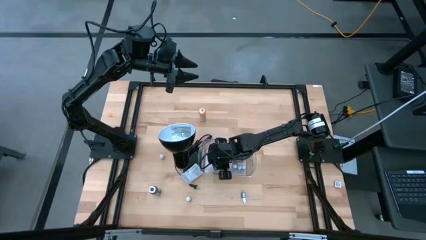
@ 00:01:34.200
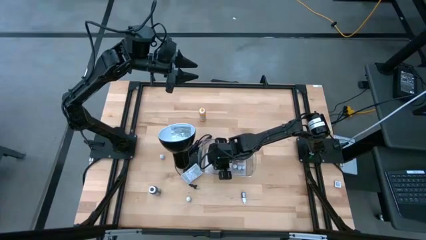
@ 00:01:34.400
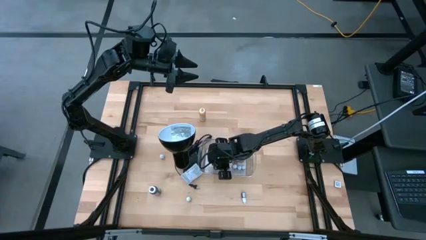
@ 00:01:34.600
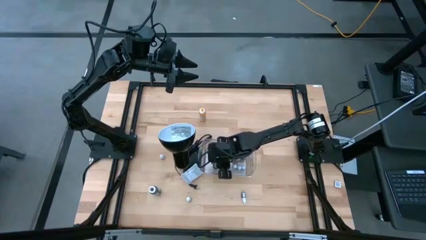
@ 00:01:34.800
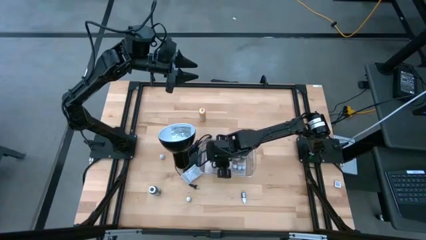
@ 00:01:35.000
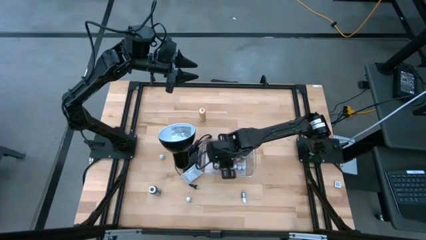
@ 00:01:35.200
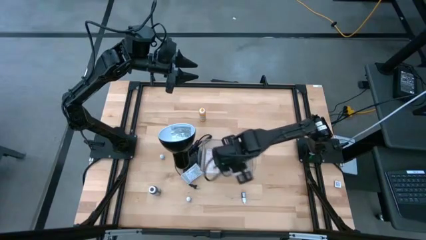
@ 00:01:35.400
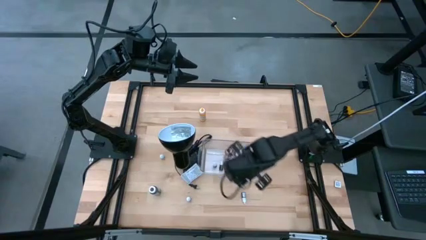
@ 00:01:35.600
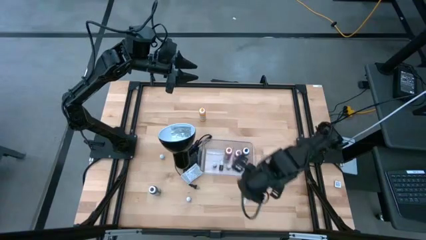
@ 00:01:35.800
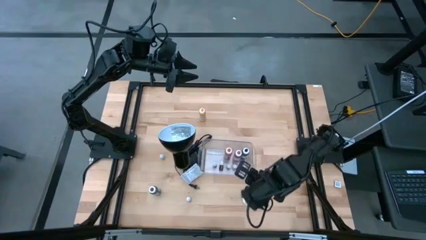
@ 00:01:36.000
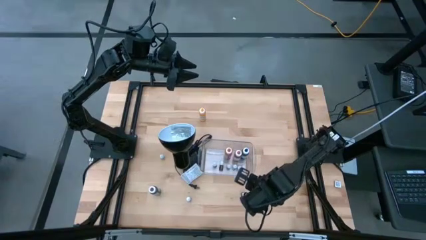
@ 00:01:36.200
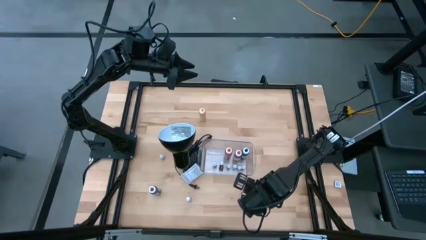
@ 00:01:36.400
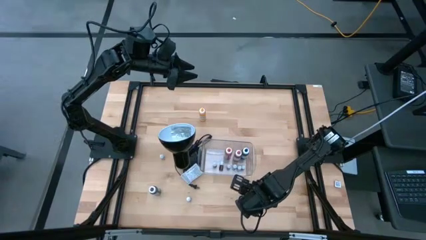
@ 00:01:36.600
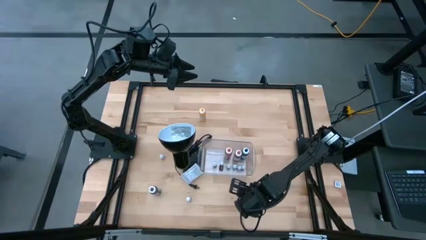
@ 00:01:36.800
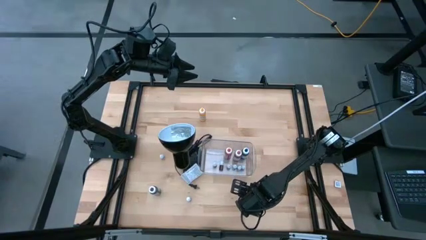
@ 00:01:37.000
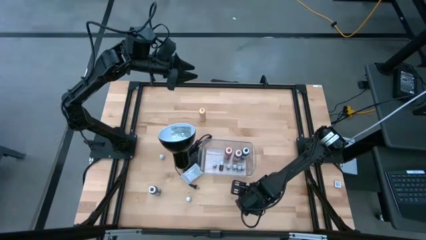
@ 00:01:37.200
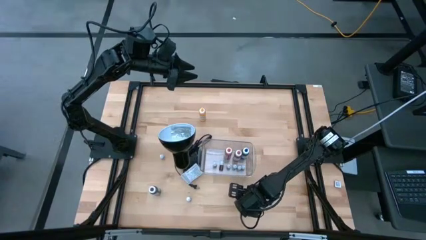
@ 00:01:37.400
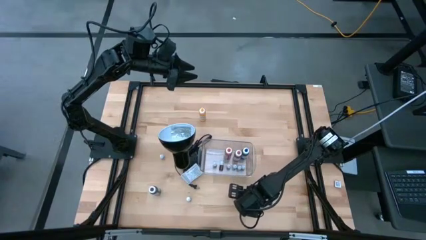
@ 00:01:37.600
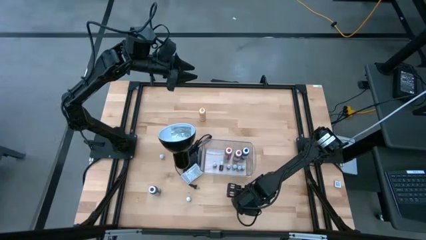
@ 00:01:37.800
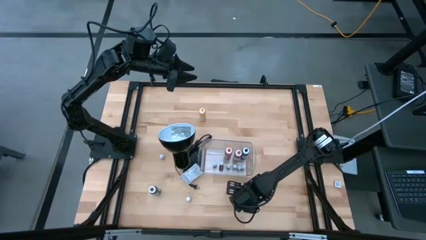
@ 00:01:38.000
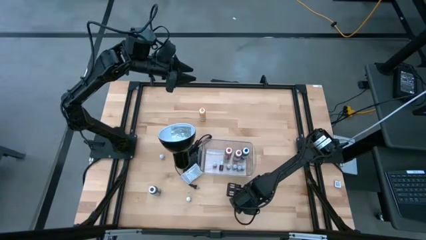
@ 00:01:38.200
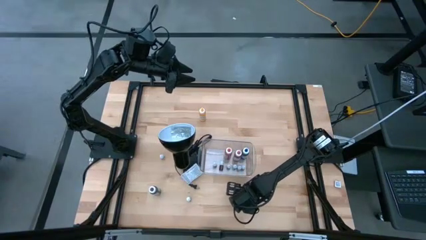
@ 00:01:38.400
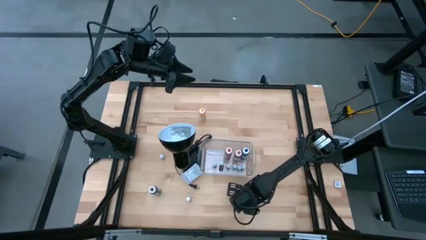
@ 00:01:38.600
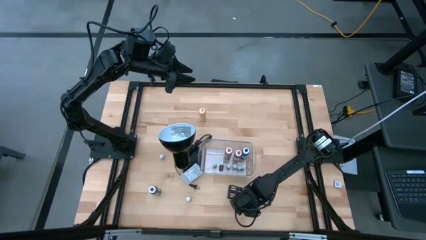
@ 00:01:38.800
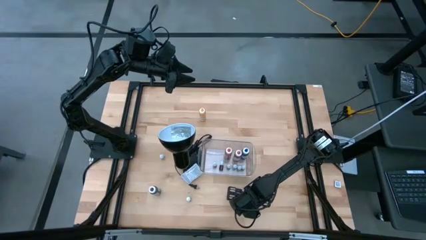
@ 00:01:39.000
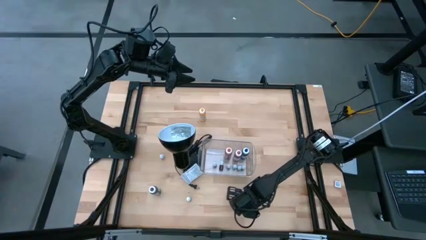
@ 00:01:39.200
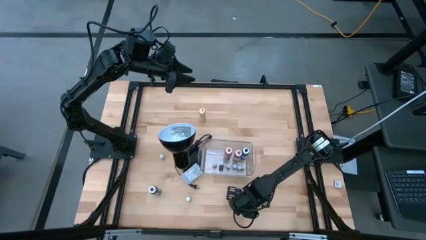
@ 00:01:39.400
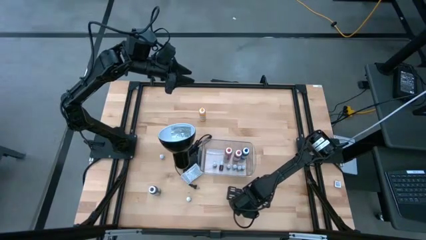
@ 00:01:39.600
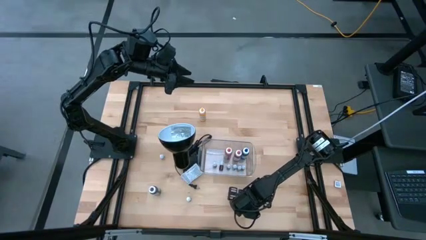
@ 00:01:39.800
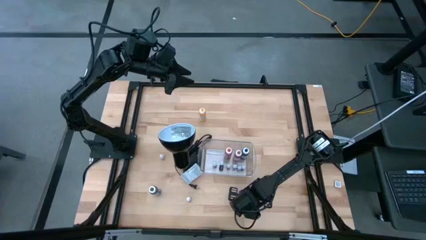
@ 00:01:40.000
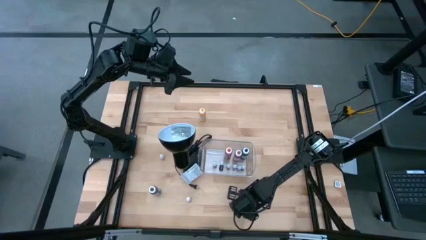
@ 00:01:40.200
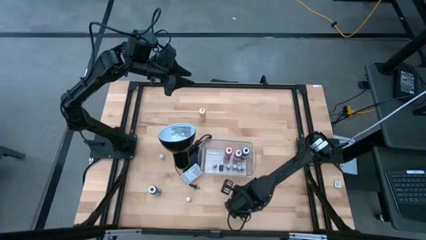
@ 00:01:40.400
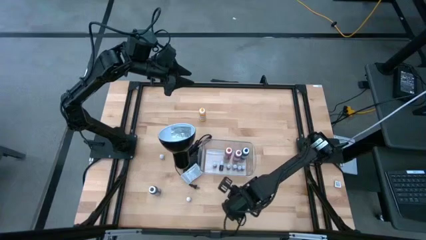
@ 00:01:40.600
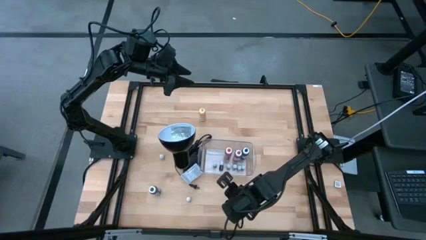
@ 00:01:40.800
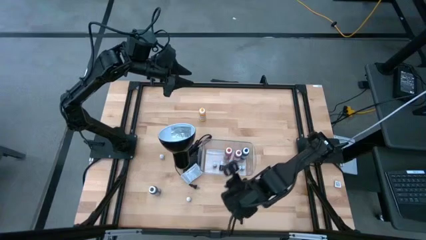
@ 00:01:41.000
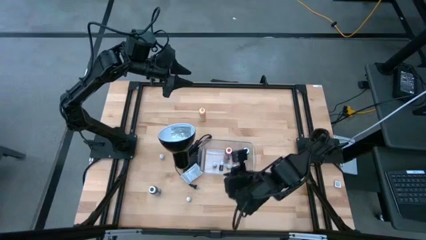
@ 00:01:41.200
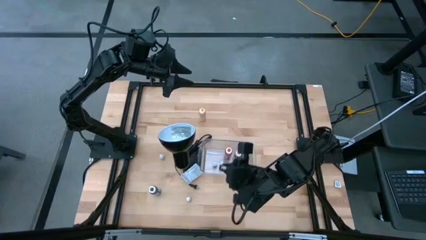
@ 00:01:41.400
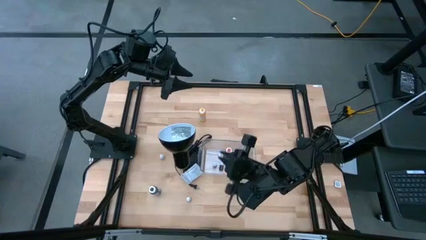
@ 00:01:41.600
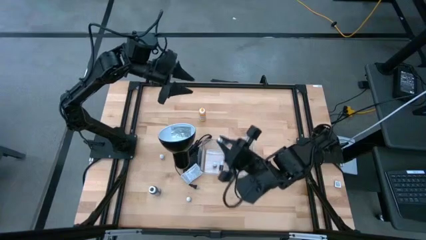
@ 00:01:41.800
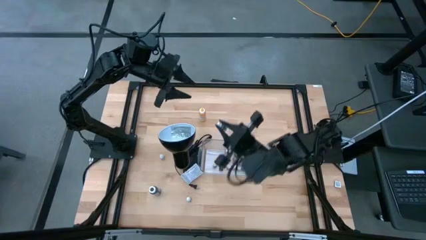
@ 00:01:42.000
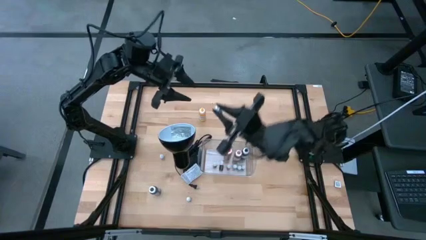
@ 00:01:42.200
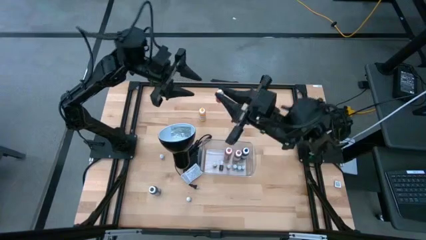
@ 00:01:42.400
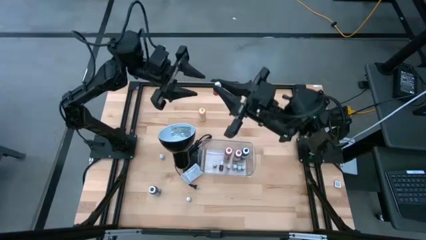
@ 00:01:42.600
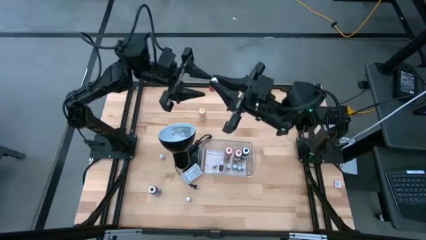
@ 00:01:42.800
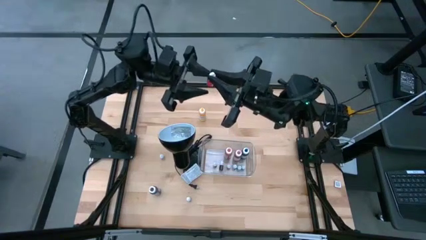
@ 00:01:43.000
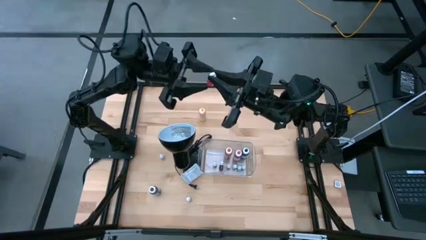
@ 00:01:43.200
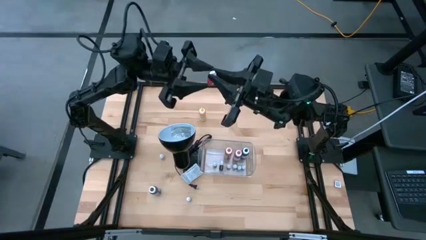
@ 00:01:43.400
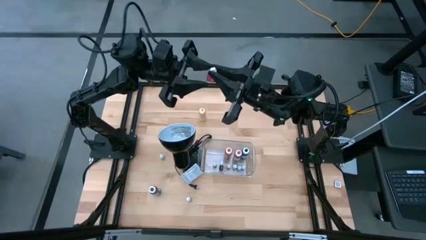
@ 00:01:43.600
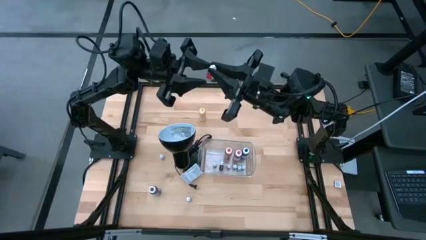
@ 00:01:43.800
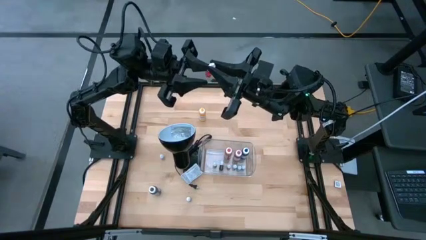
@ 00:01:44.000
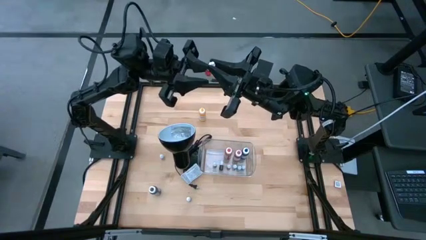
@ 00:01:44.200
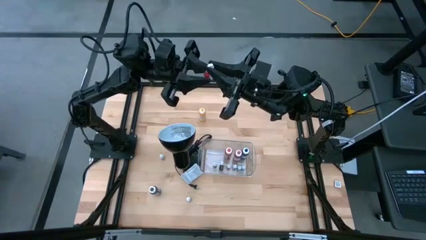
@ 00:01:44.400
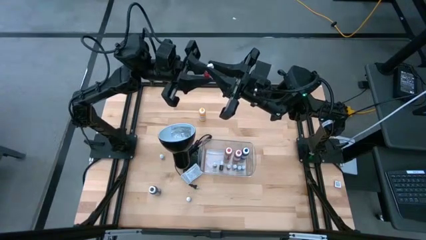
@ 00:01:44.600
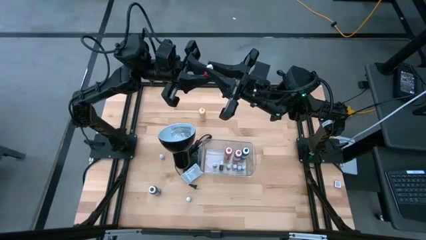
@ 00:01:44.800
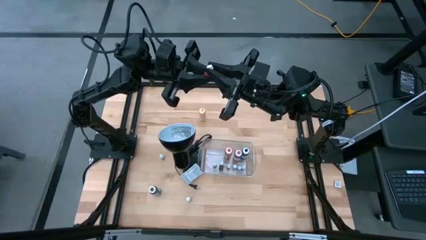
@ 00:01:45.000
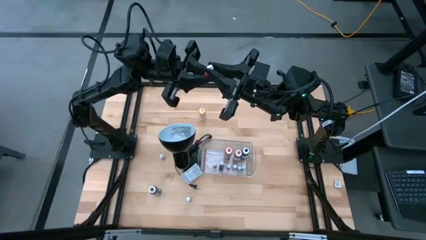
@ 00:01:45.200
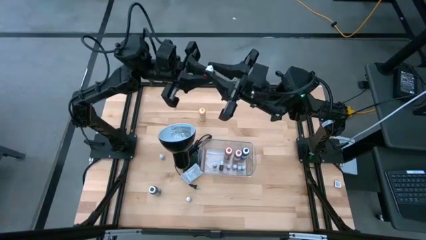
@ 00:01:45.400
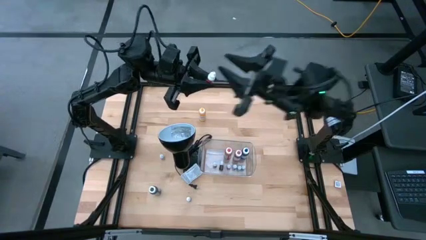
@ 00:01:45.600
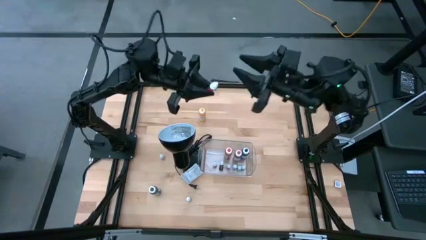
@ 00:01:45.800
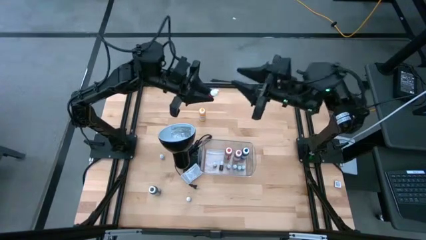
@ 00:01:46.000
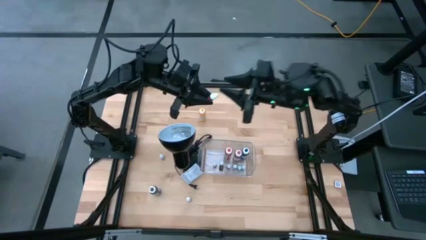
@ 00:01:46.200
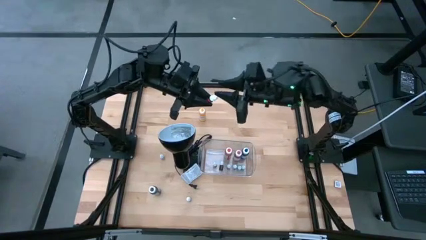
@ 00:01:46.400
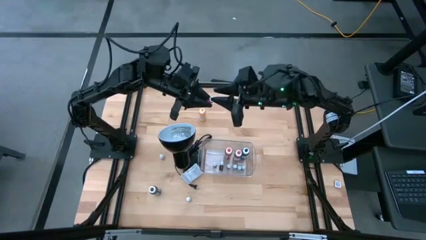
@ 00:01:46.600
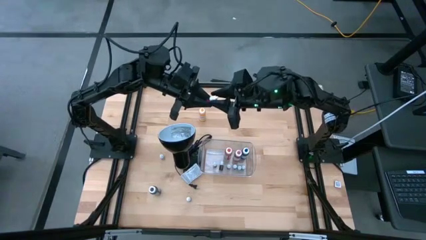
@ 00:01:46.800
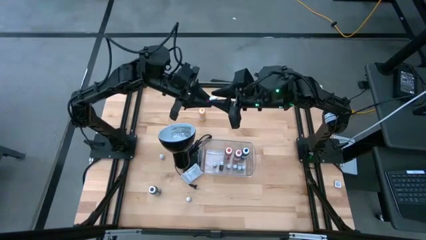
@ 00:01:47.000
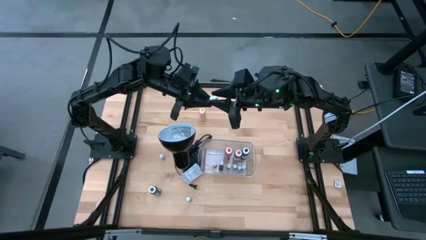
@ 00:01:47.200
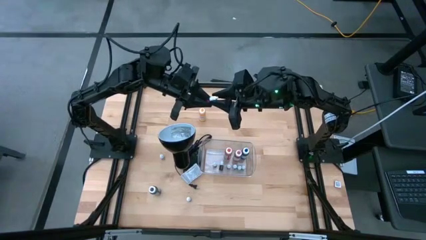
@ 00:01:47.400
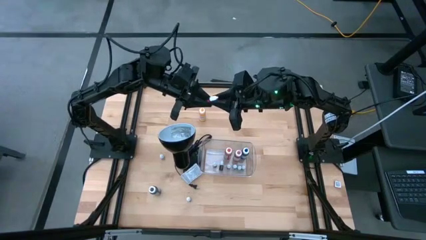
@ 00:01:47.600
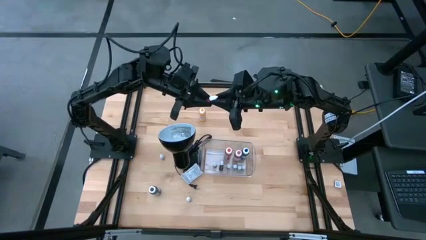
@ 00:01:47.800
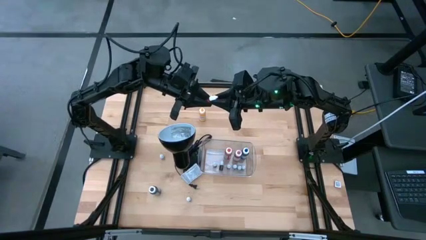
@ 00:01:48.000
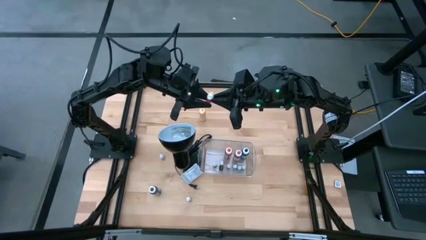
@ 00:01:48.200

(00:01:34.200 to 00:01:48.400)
Task: Pick & Place food coloring
Put the small red food coloring bottle into the transparent bin
